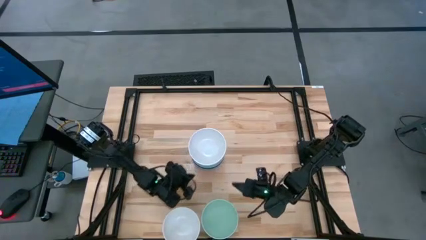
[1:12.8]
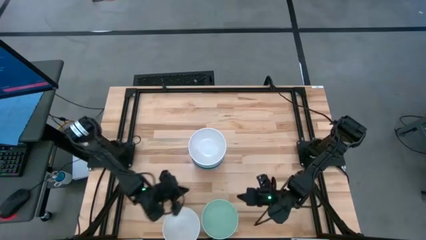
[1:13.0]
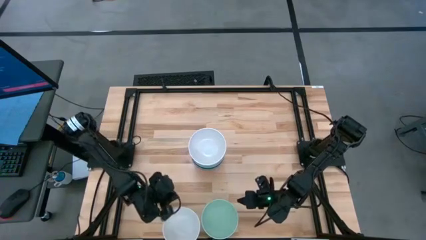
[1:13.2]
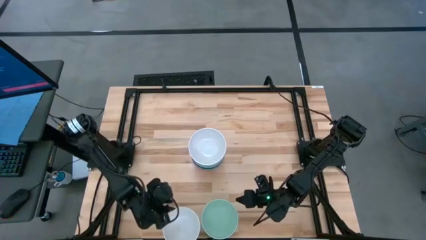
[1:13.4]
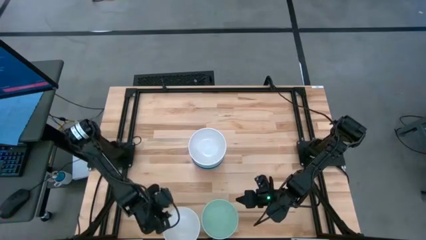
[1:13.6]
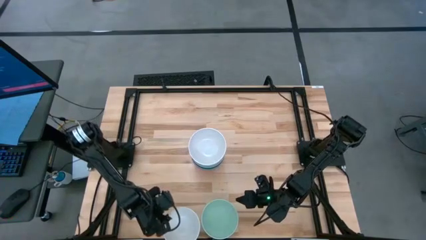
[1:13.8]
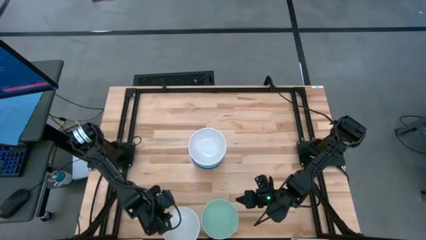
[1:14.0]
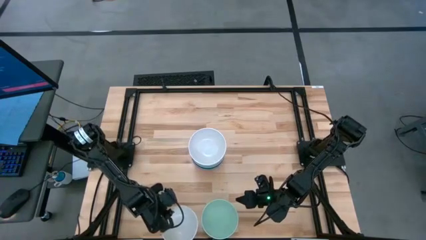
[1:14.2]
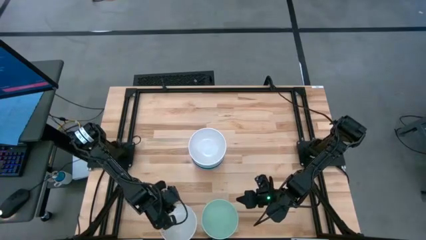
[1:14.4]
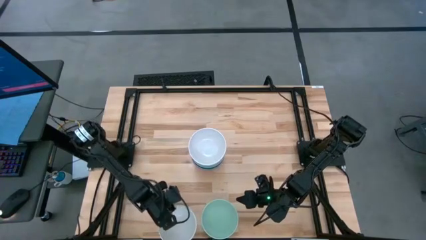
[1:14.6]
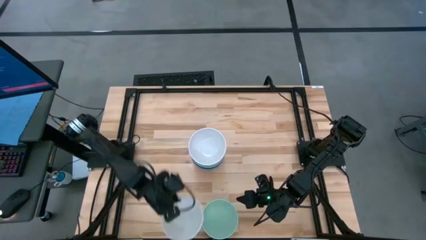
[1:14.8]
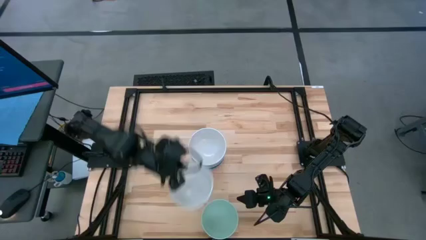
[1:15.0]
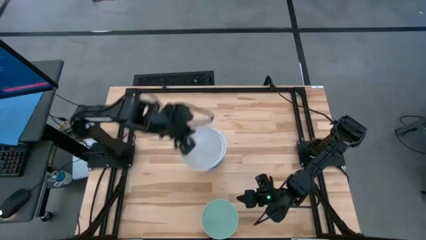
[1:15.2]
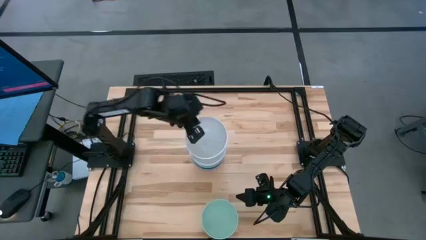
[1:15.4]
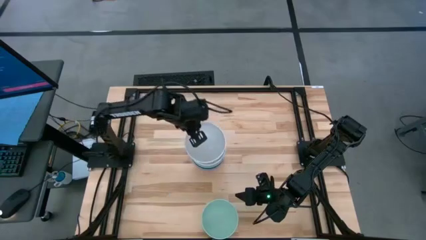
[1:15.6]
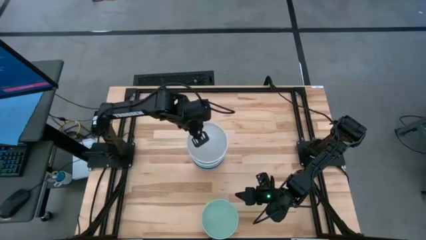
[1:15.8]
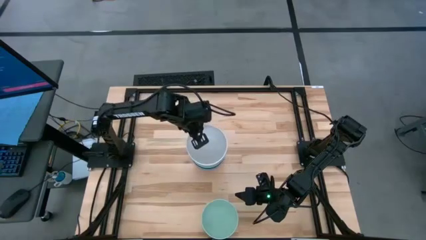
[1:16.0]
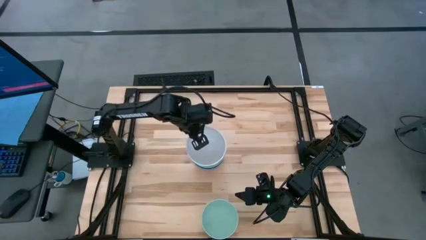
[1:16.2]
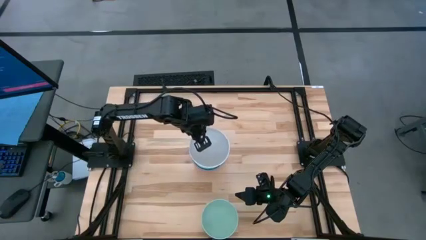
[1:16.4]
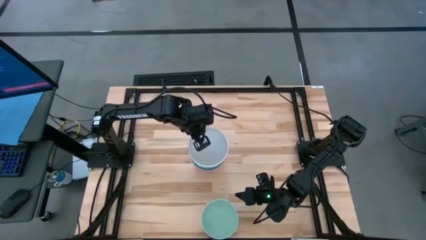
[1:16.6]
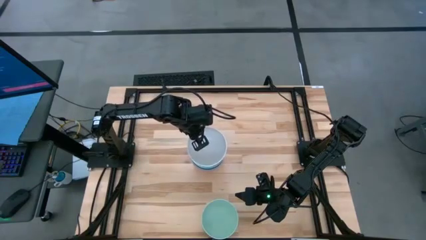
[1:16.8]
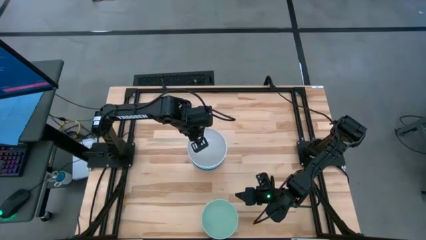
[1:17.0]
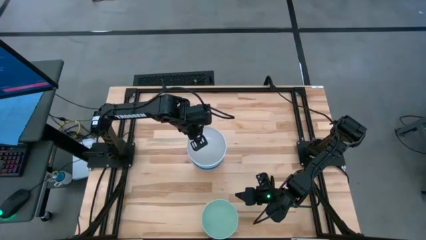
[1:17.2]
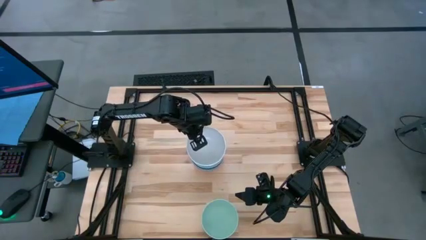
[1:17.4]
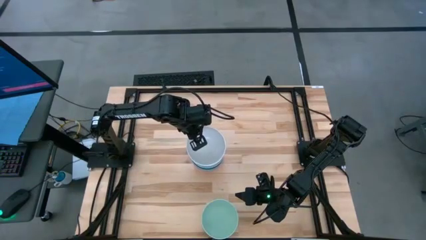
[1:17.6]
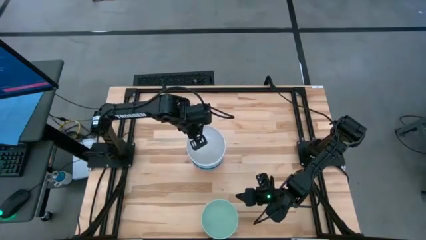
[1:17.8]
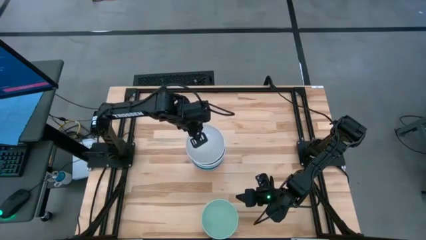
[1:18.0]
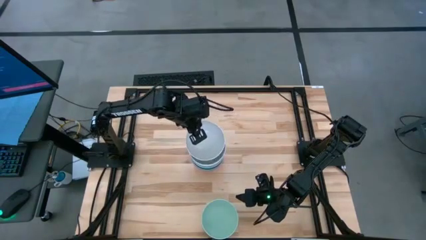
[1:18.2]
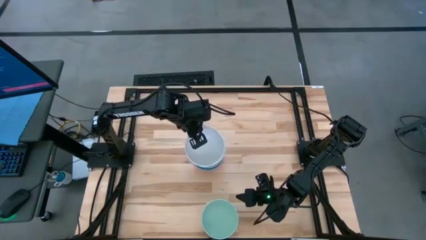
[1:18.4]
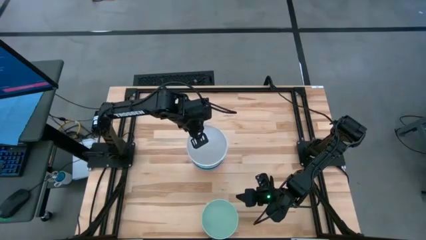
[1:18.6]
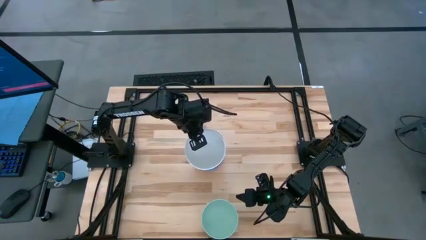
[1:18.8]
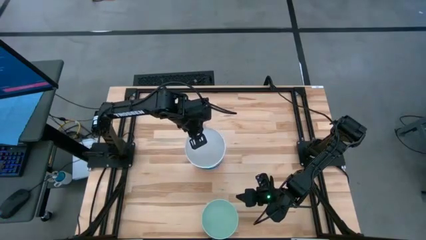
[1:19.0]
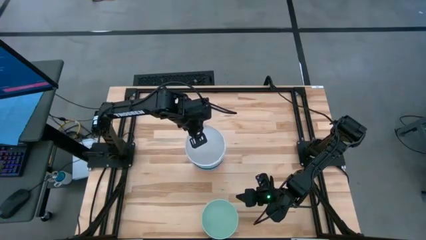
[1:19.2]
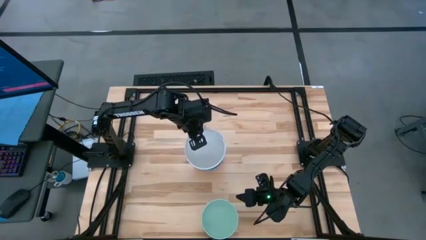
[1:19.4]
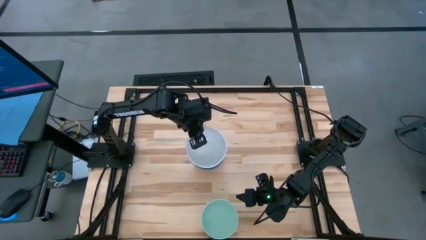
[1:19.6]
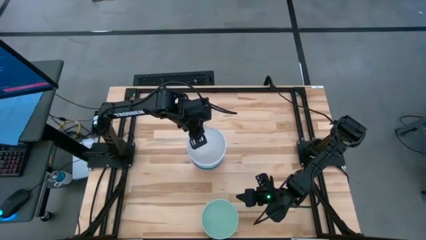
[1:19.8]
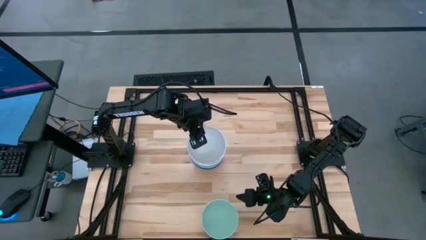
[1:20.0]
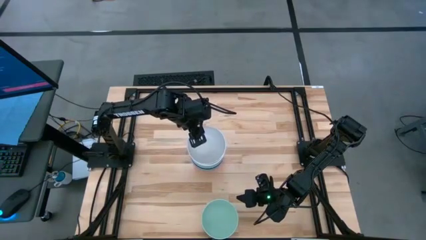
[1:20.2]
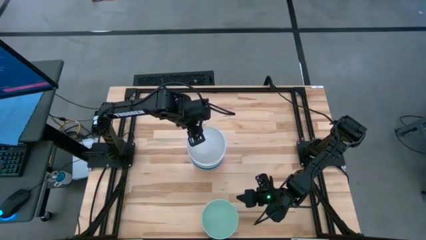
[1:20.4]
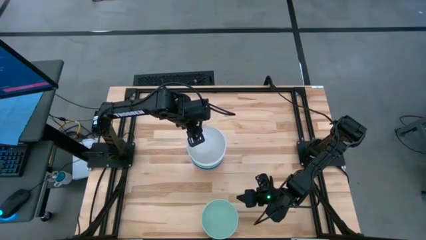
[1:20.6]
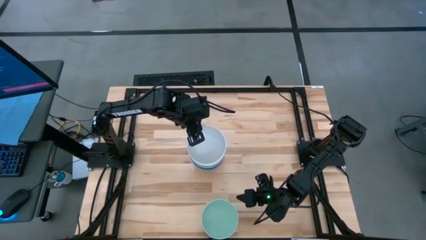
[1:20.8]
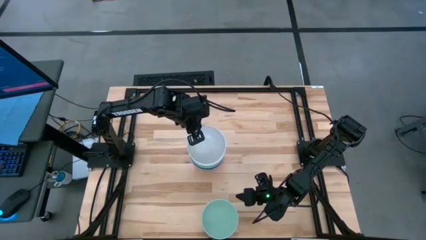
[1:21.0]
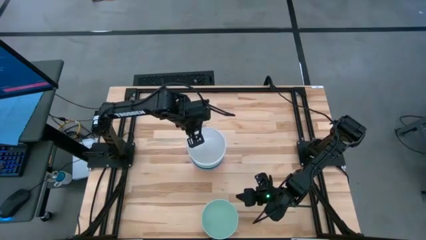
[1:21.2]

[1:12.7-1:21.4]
Task: Nest bowls inside each other
Stack the white bowl on the white bowl

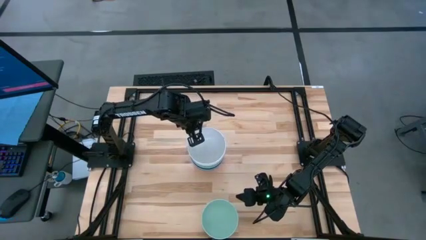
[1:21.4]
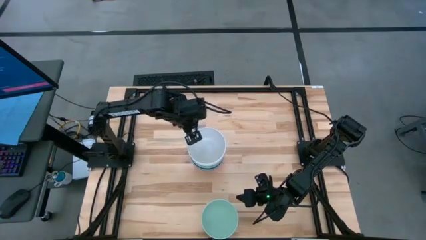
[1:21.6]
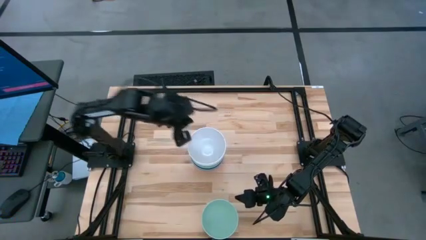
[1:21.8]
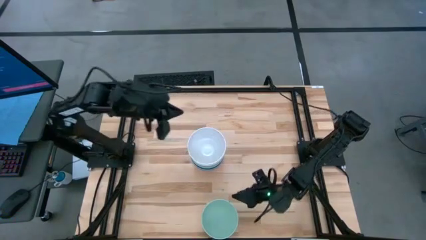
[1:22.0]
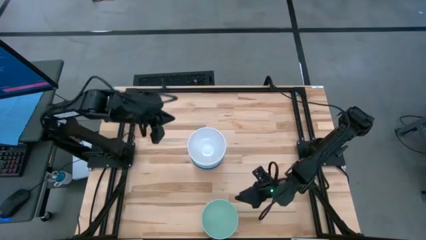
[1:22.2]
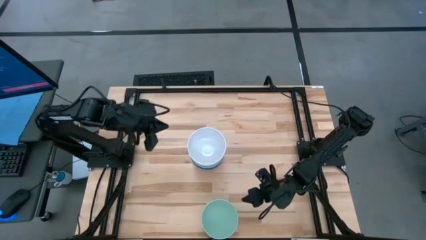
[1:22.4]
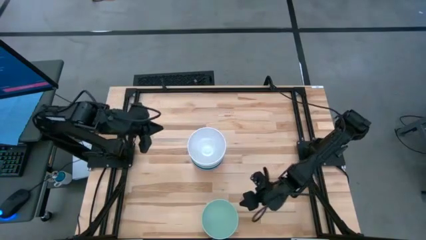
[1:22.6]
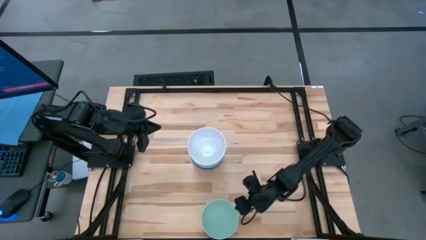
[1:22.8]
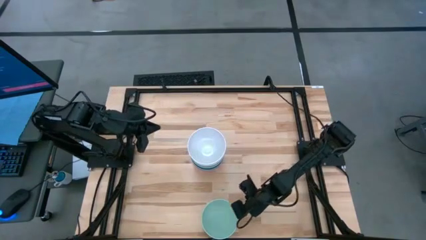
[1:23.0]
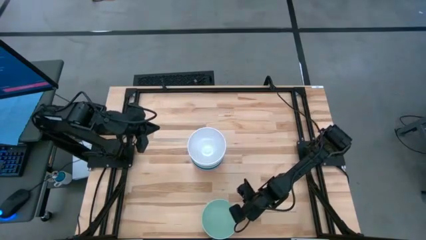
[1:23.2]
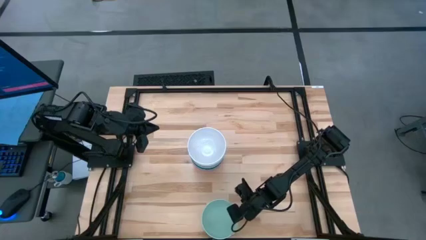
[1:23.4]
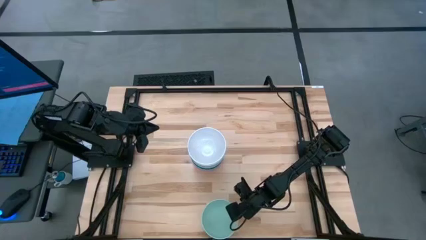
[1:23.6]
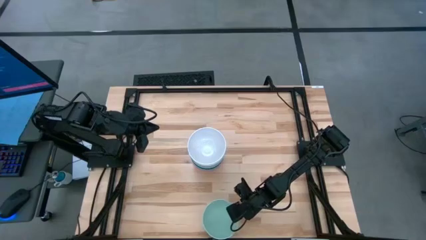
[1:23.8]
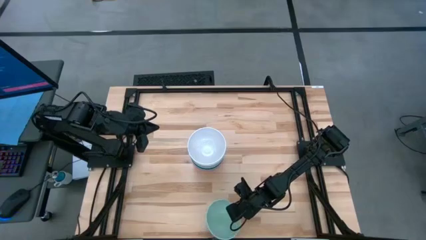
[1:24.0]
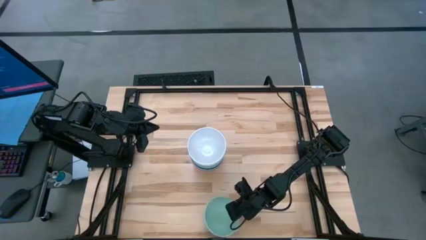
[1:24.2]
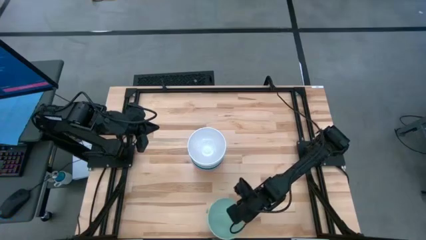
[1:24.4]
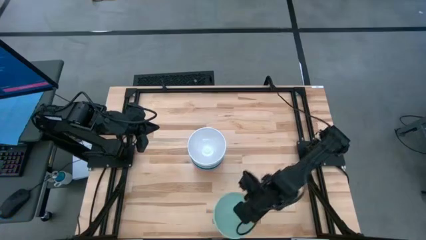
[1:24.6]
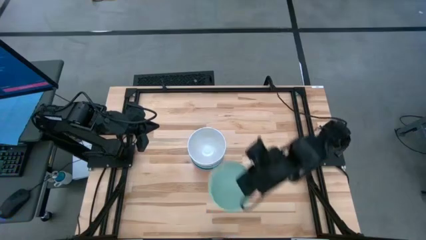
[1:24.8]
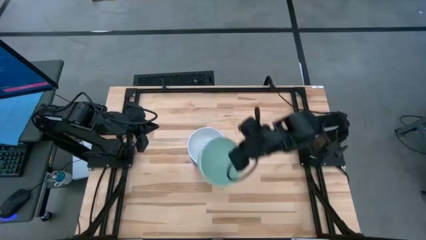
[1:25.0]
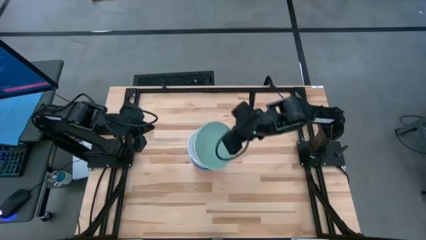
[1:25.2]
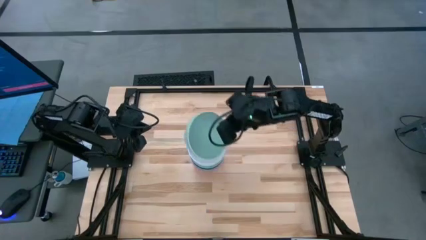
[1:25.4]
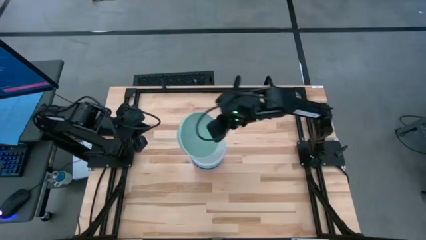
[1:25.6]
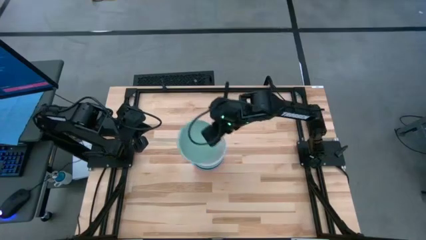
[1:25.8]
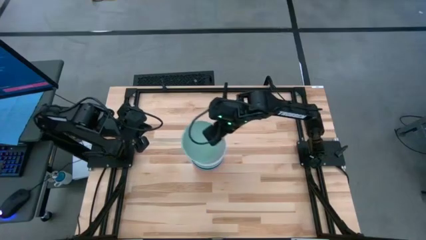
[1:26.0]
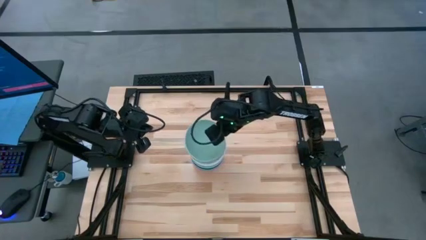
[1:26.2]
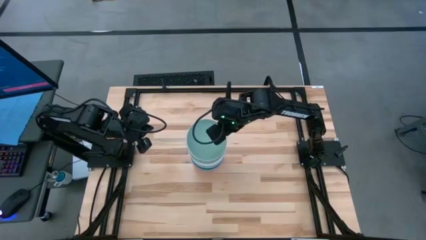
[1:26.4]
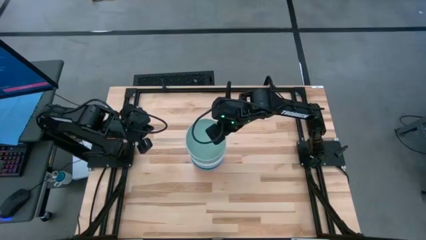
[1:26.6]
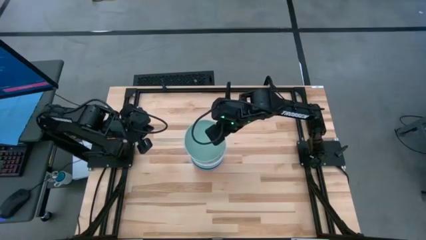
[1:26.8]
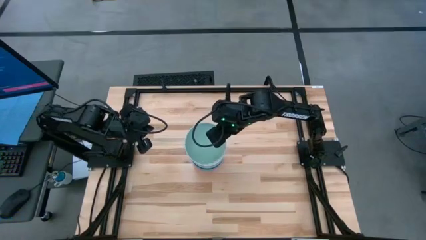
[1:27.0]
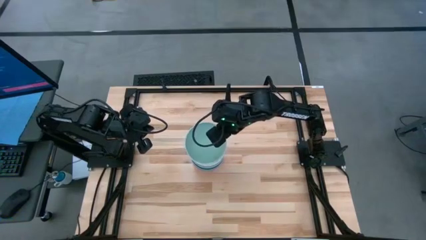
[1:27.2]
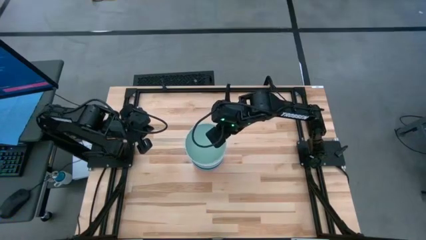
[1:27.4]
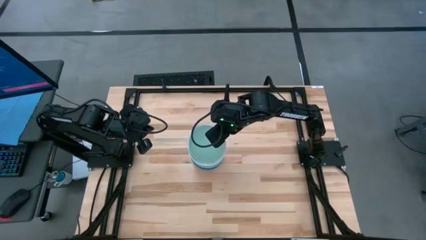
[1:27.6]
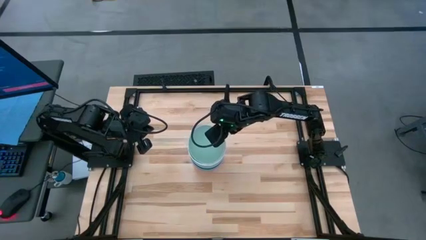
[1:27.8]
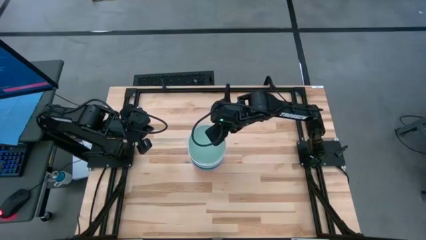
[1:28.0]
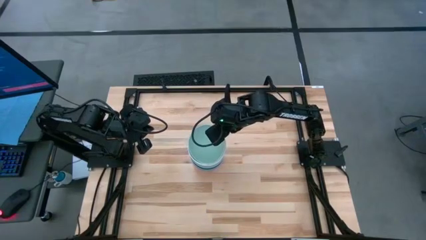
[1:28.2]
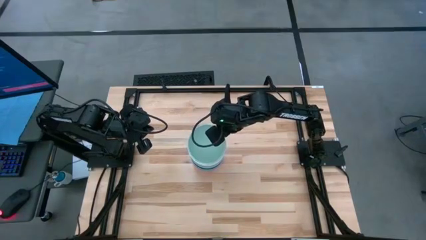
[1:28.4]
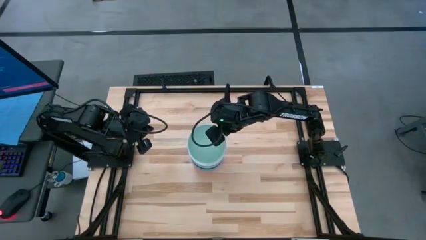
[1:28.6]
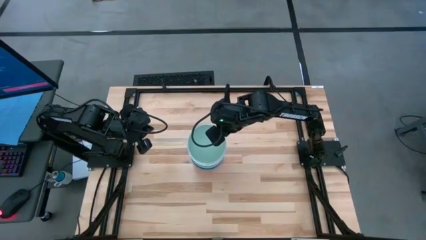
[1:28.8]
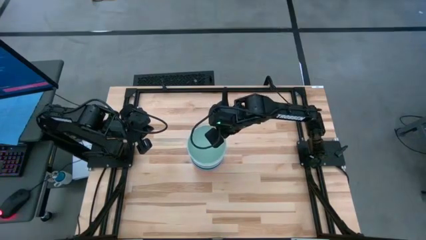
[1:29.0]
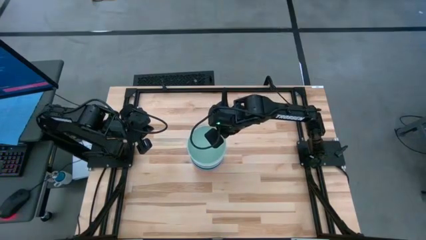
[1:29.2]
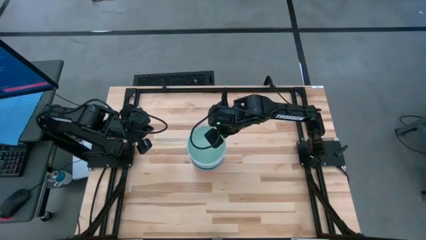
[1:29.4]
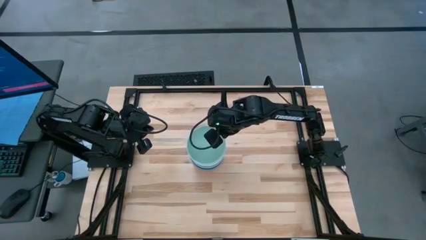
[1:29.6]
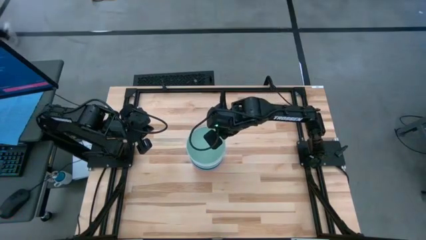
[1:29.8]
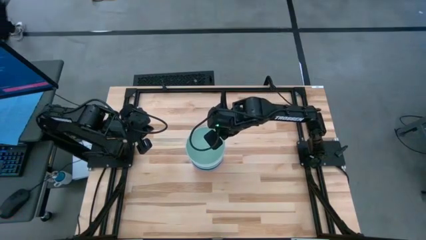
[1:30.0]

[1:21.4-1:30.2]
Stack the light green bowl on the white bowl
